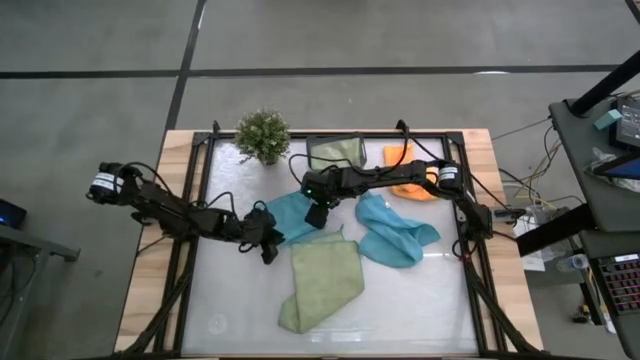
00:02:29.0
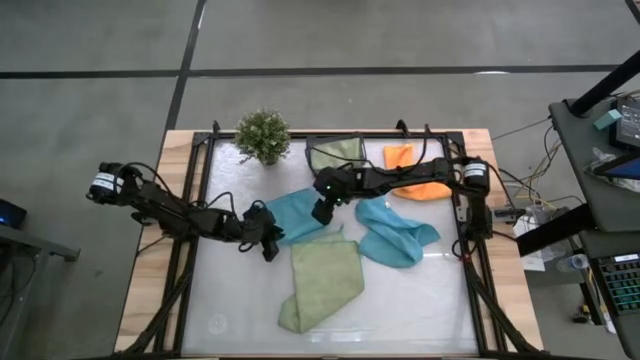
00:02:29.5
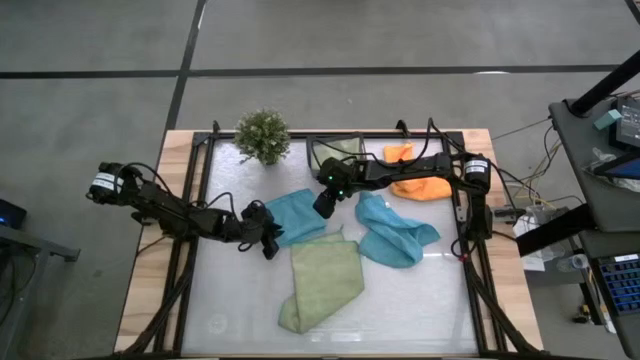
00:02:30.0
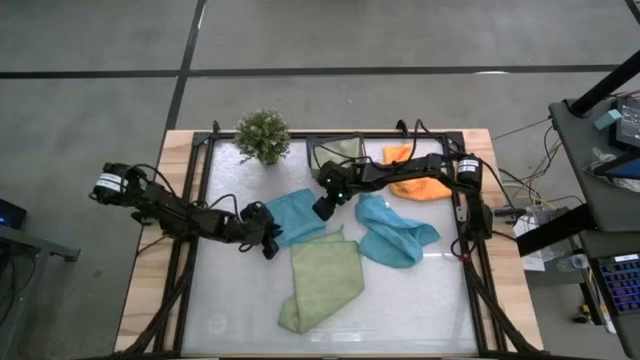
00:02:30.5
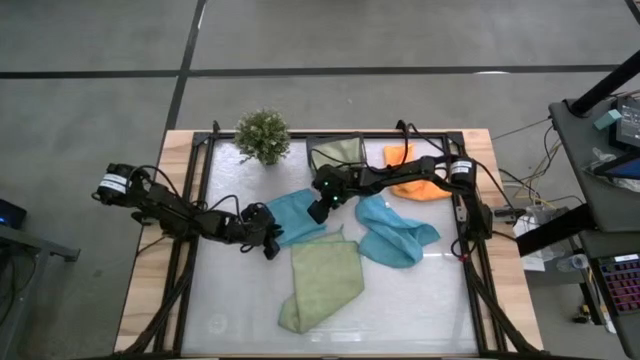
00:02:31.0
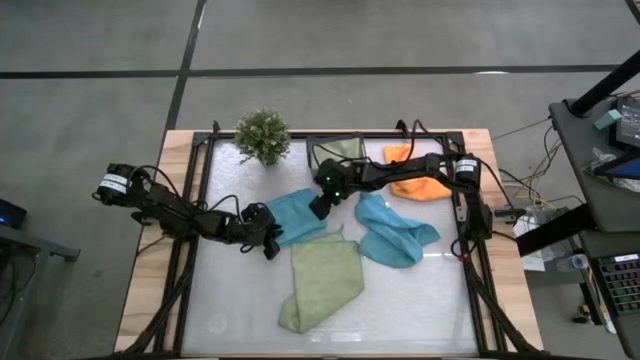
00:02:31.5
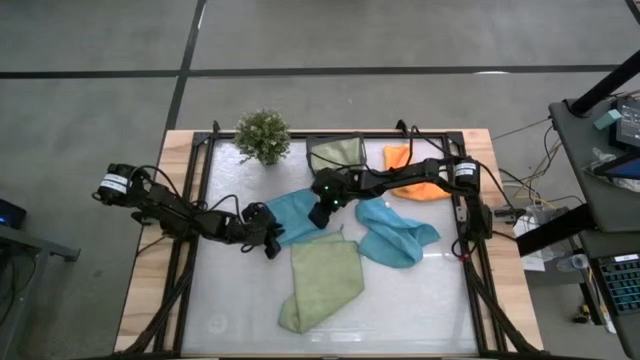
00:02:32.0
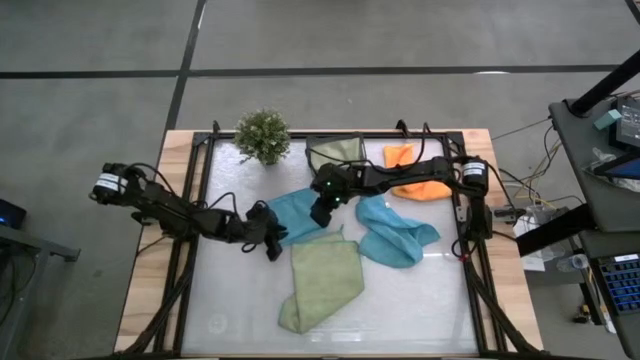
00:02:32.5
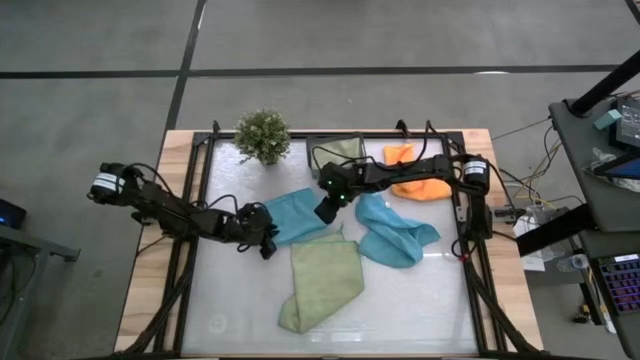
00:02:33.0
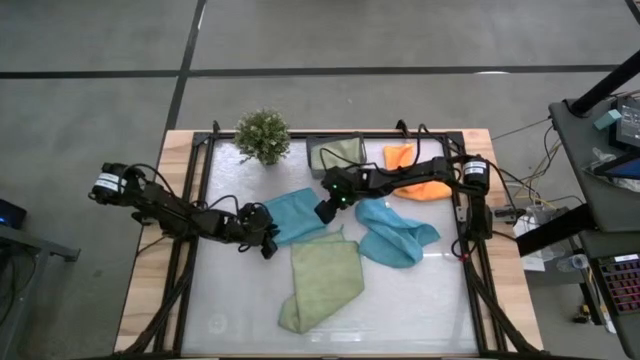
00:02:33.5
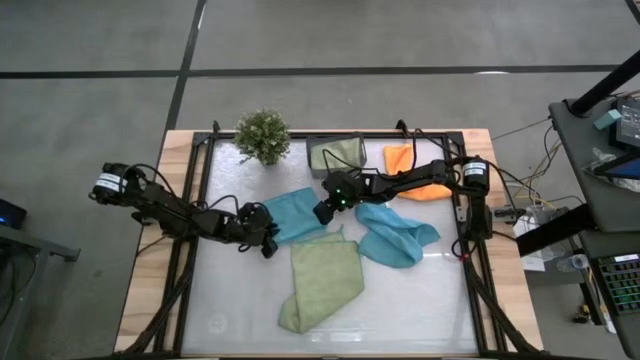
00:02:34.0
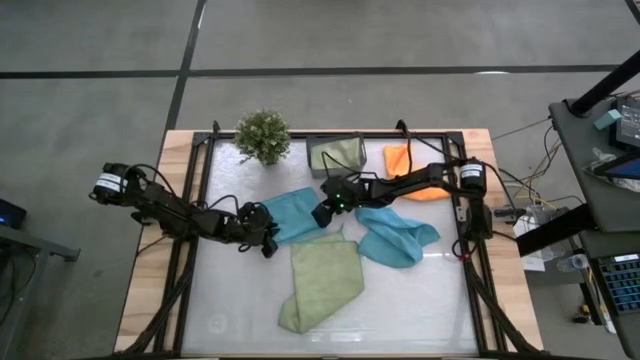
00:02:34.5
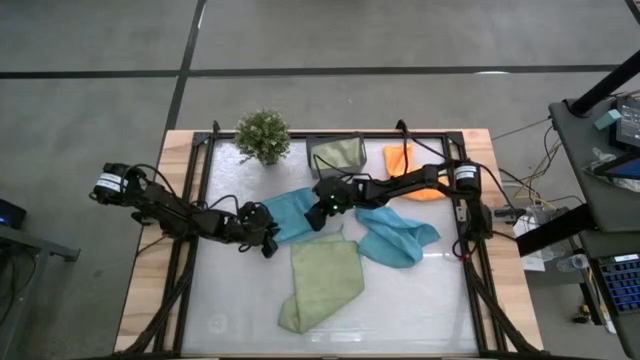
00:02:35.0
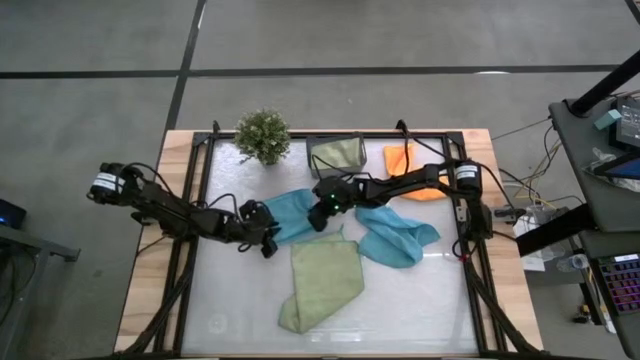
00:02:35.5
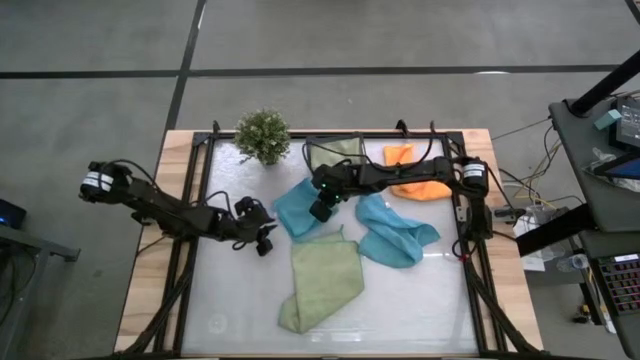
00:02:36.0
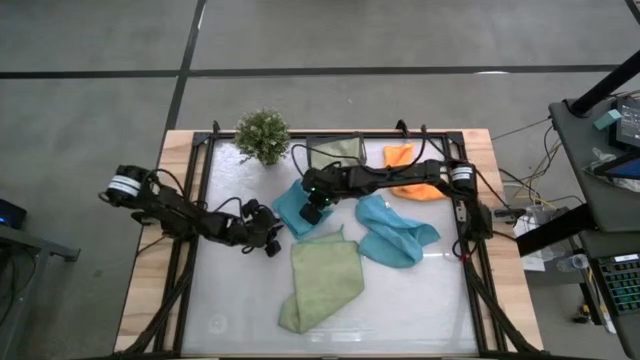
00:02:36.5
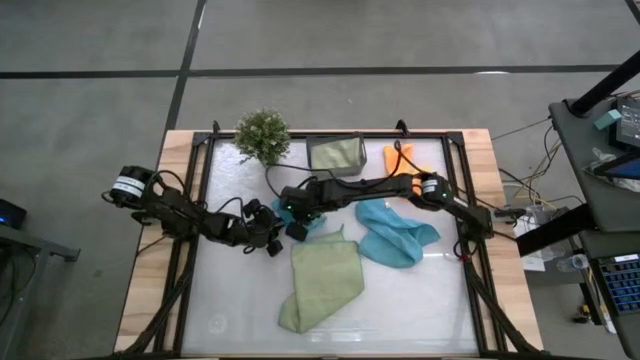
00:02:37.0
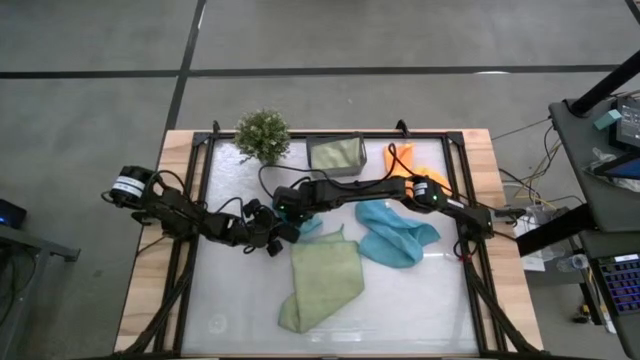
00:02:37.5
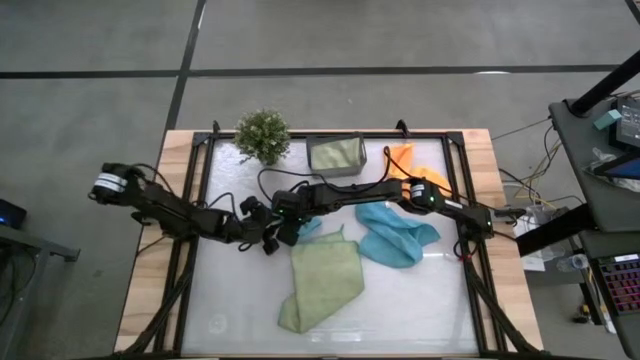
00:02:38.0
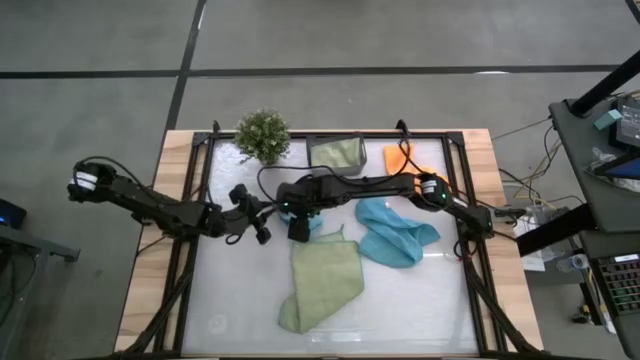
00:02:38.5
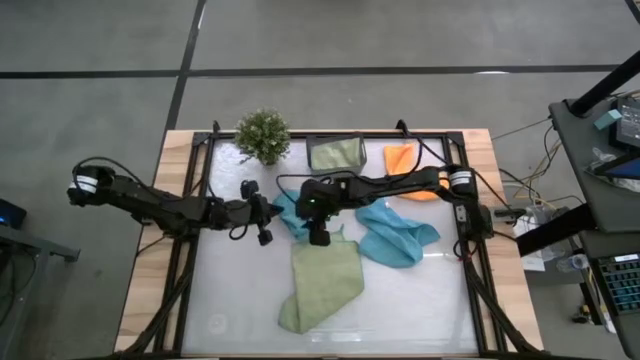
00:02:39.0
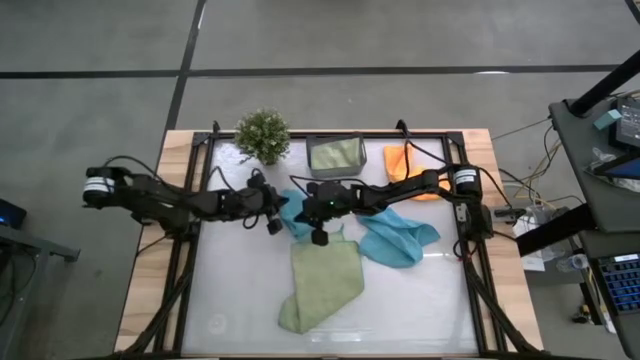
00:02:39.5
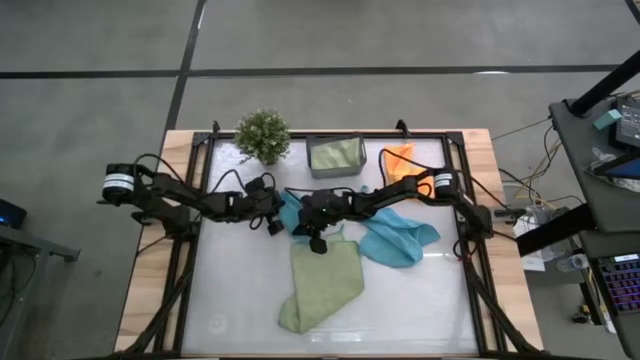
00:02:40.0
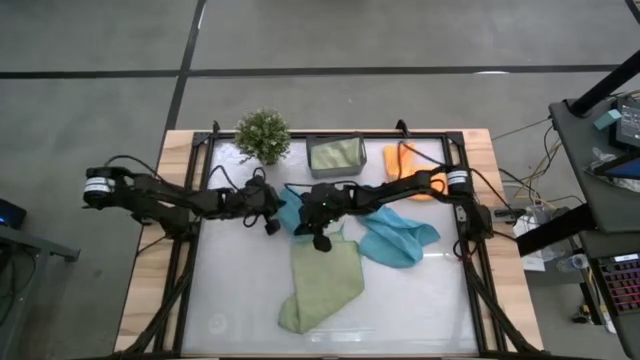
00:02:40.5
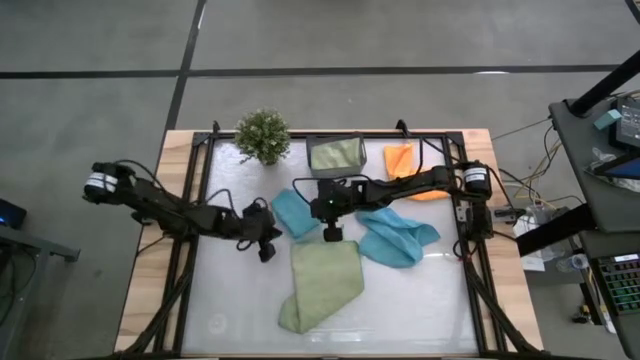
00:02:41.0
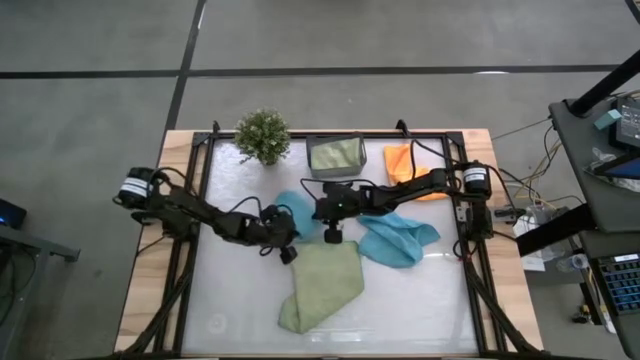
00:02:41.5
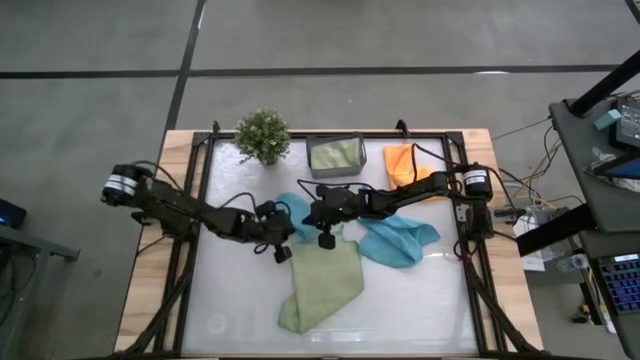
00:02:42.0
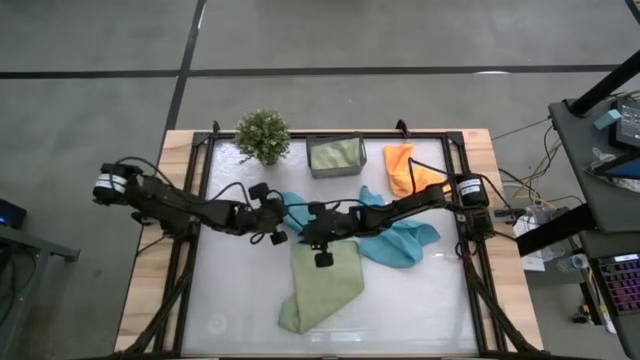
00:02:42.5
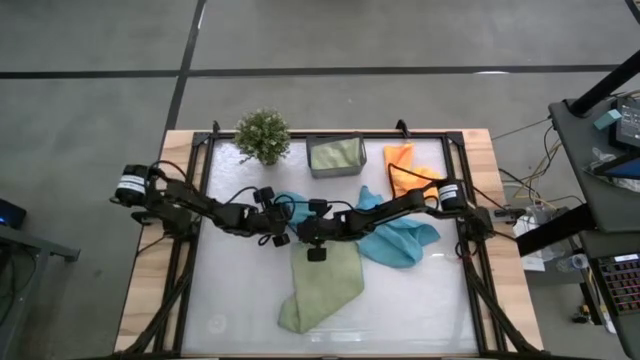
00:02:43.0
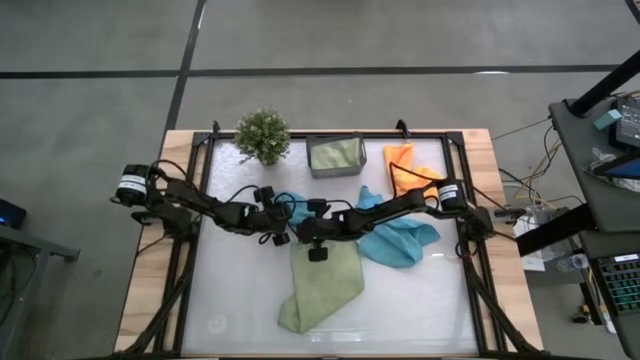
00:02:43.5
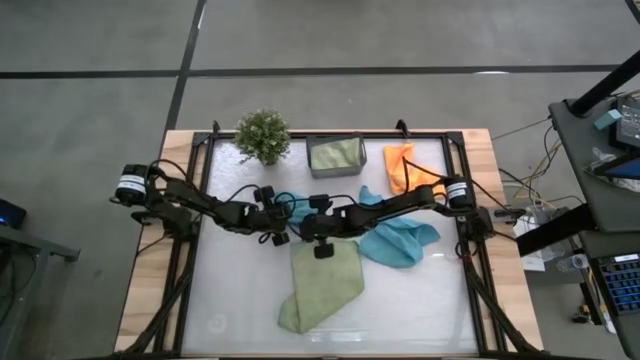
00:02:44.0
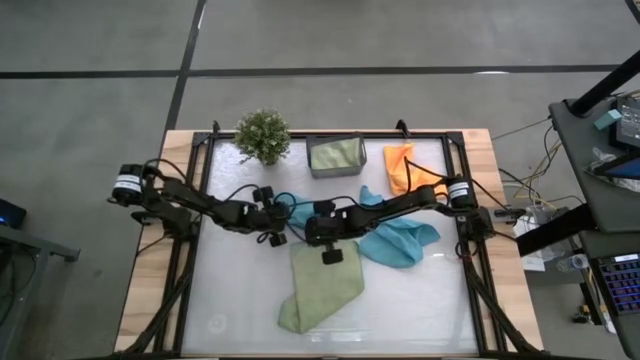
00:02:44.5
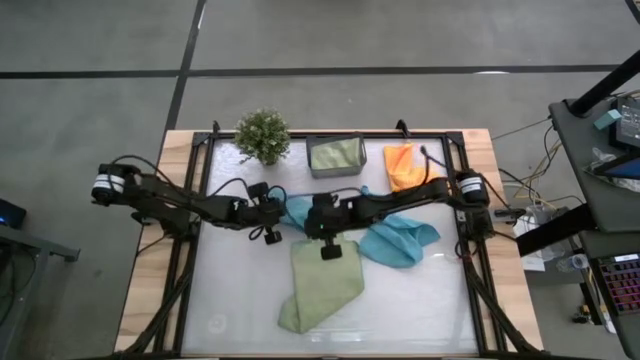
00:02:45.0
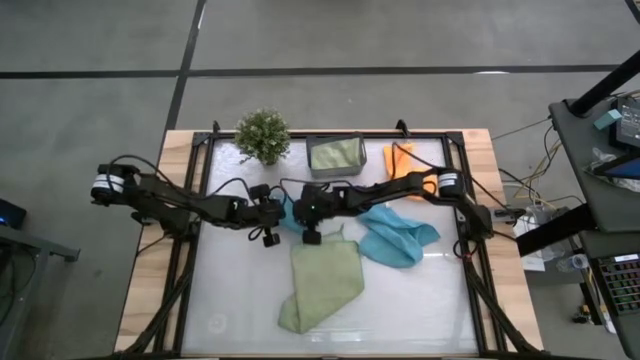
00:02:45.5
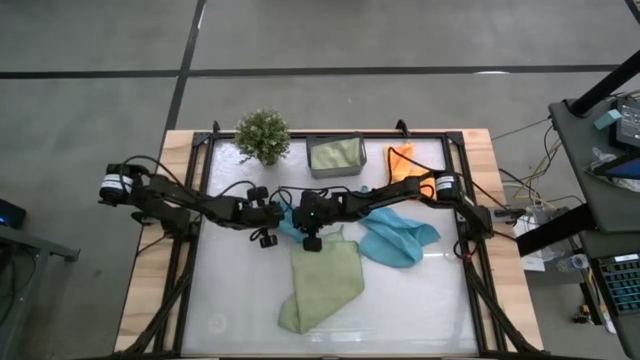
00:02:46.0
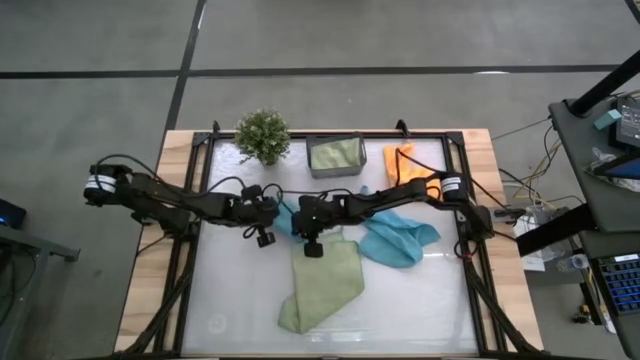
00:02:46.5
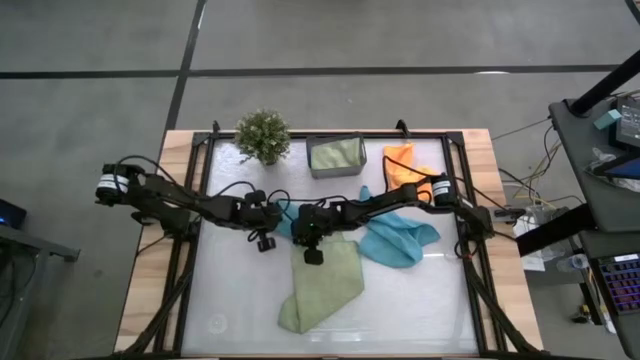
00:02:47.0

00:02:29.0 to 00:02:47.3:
Task: Fold microfiber towels
Fold the left blue towel

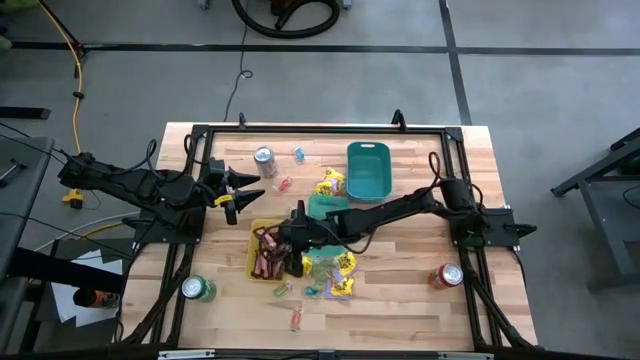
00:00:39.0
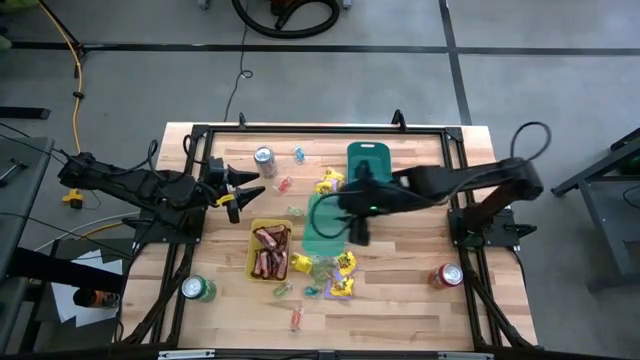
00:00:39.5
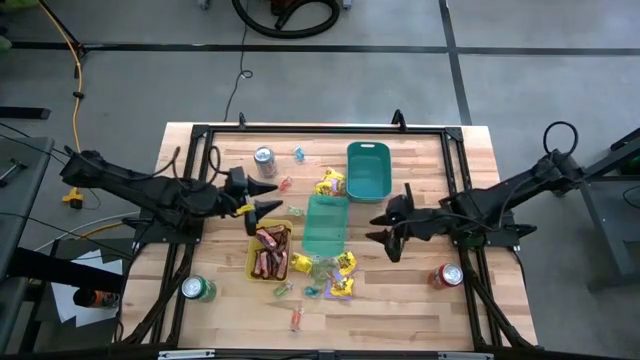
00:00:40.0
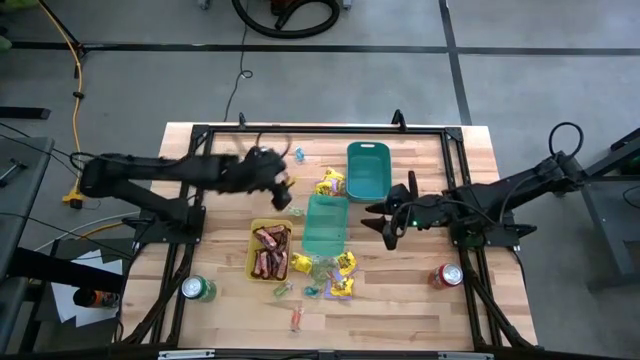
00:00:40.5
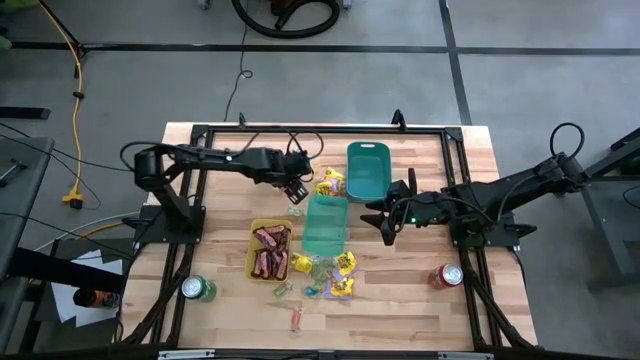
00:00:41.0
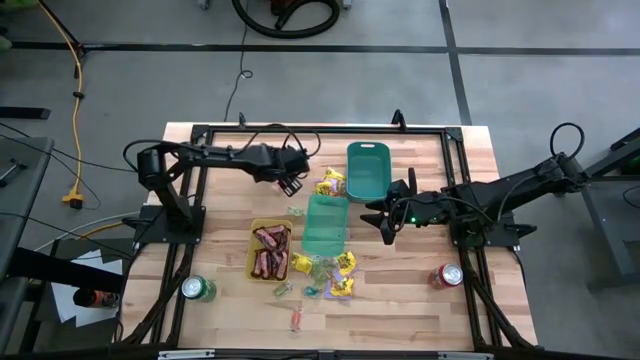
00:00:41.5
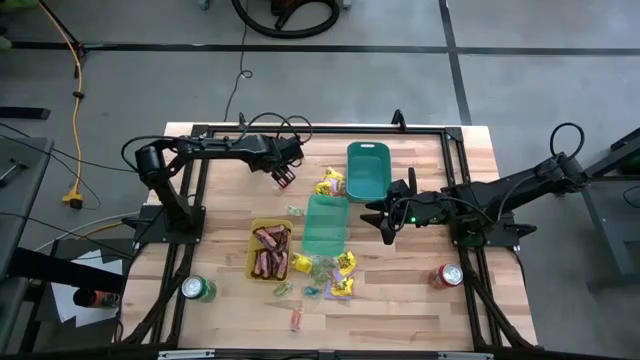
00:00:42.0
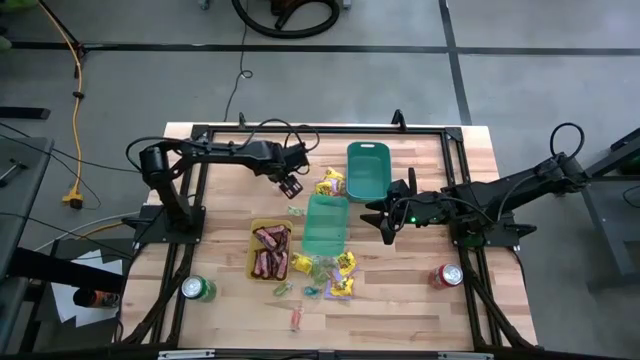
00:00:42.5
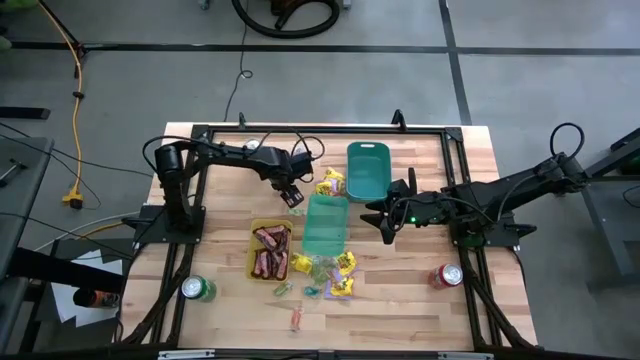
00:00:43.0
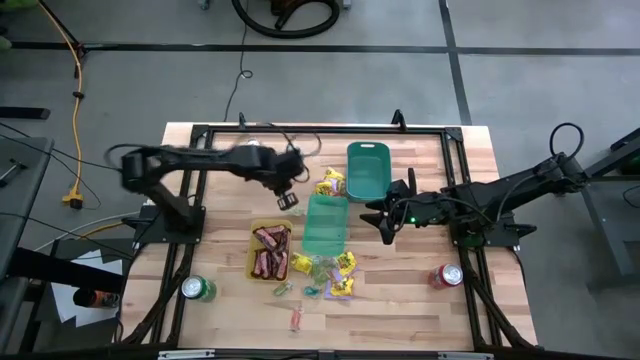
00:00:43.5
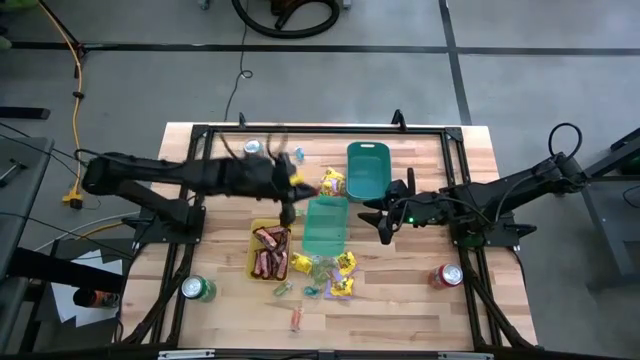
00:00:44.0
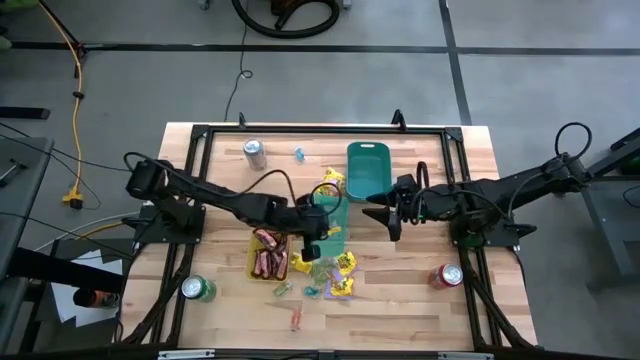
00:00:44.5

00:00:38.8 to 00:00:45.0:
Task: Sort candy
Put the red gummy into the light blue bin
